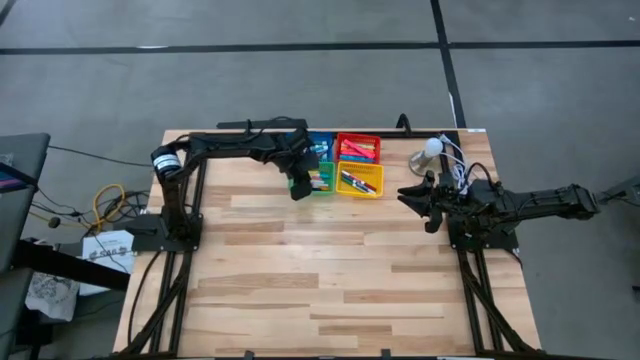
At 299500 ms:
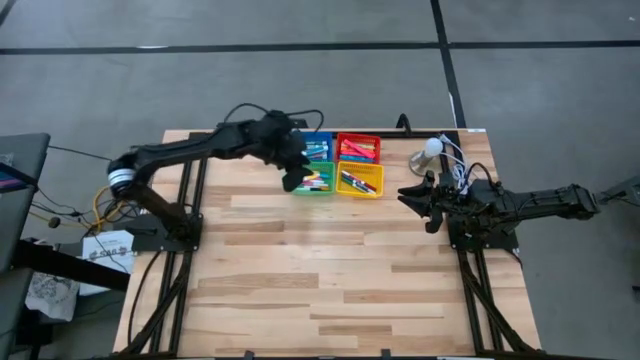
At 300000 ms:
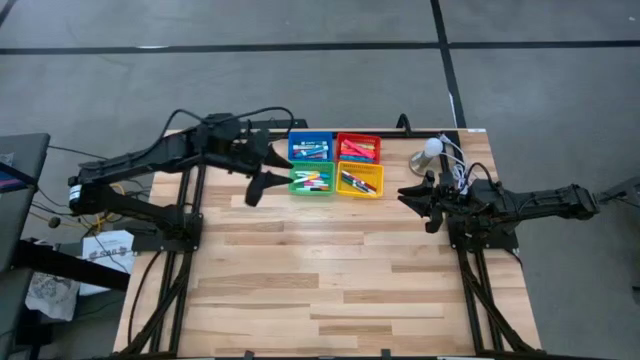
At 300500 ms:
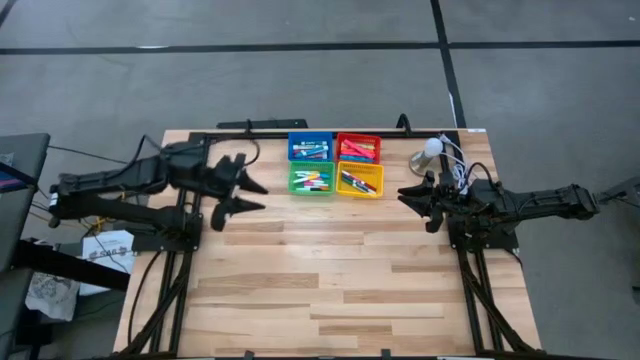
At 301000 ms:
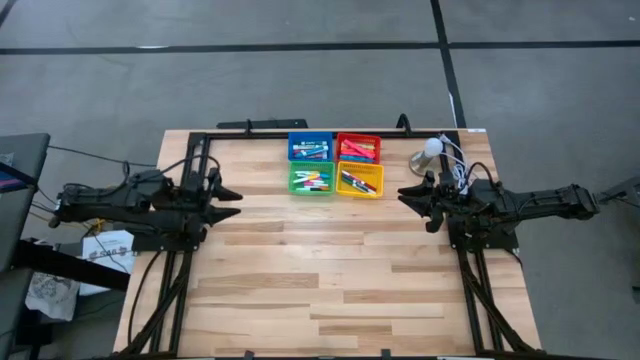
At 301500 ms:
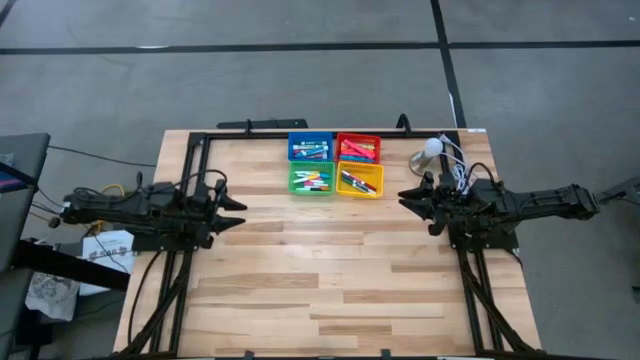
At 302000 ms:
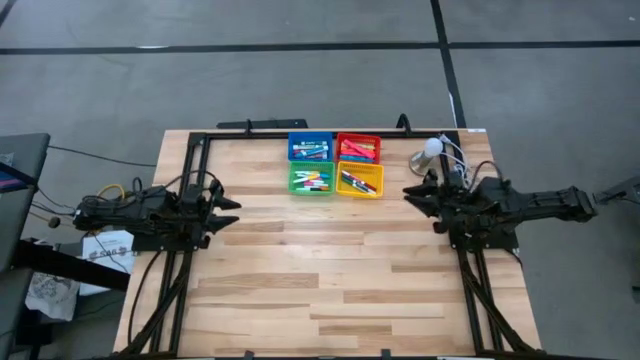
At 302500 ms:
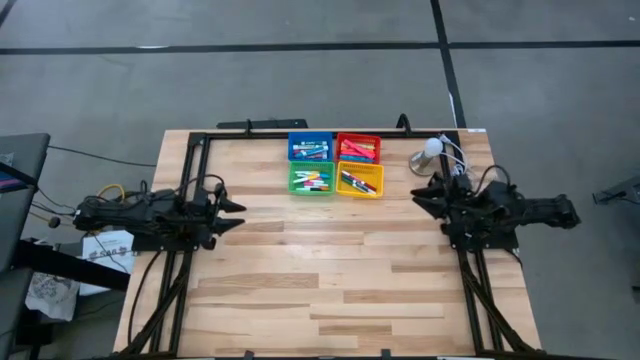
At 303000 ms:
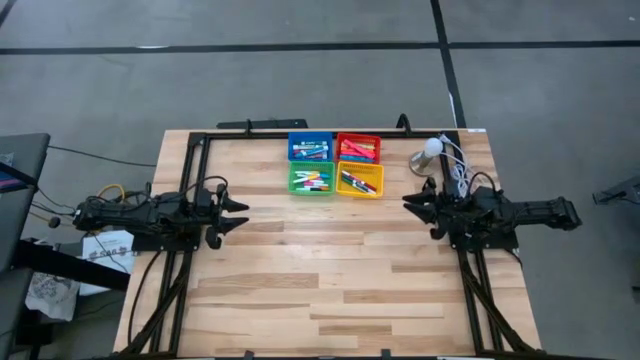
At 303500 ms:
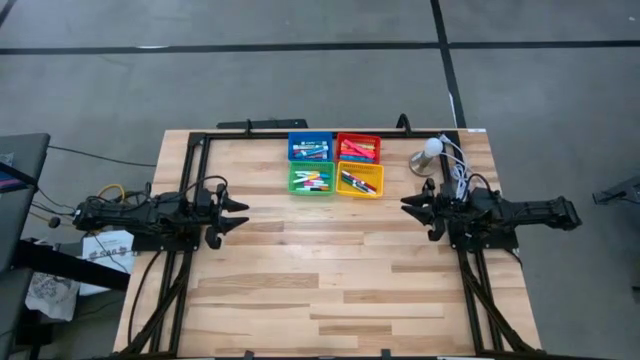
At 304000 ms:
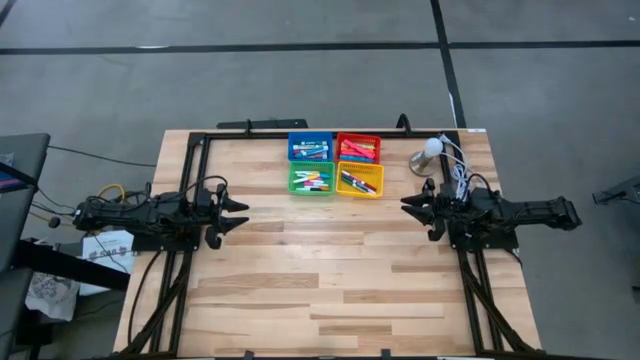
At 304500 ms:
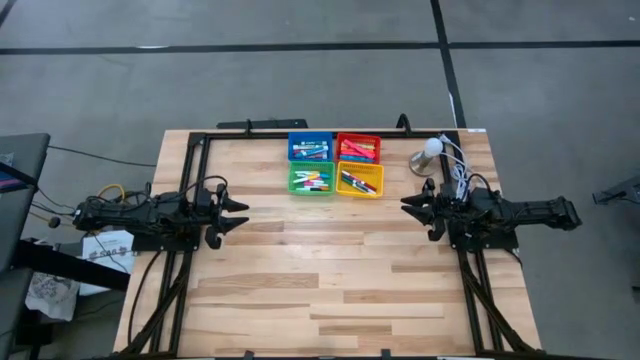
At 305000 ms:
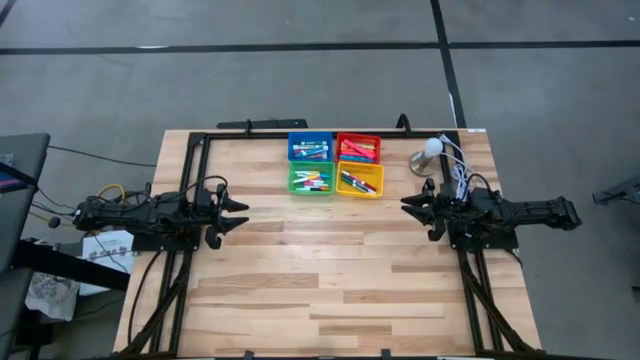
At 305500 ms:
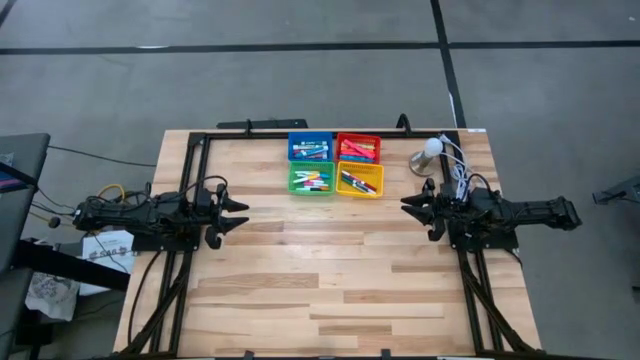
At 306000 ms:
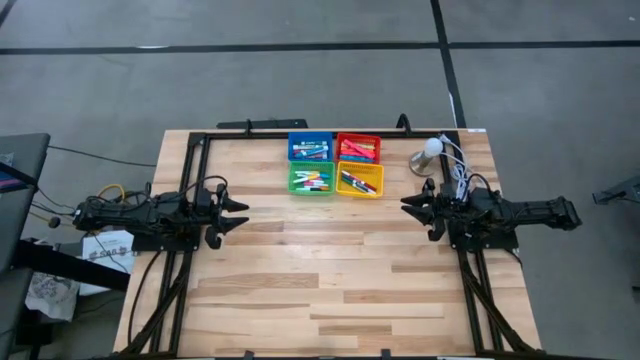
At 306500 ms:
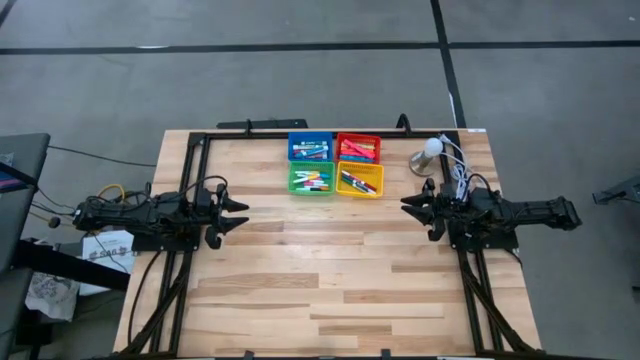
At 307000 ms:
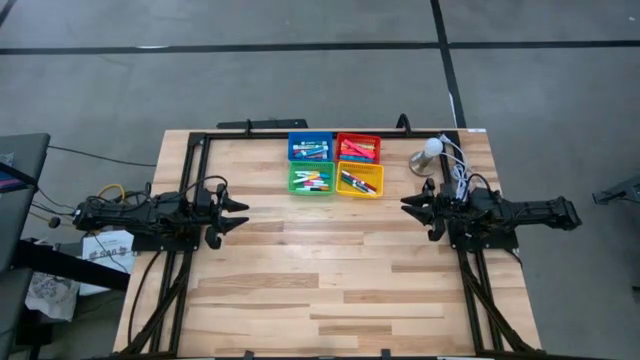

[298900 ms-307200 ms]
Task: Pick & Place Markers
Return to Home Position
